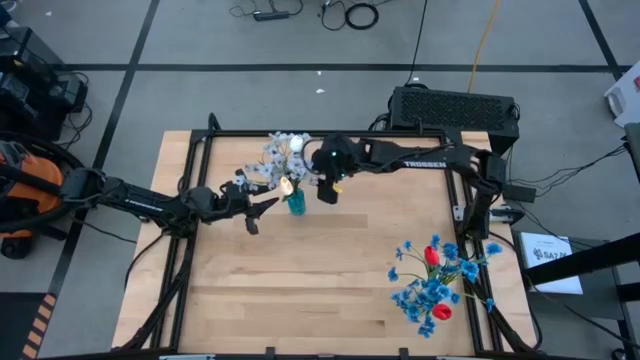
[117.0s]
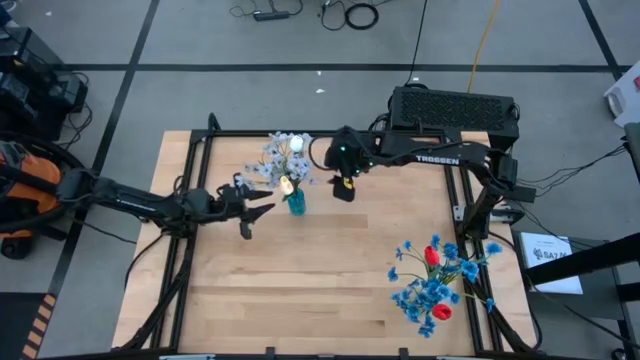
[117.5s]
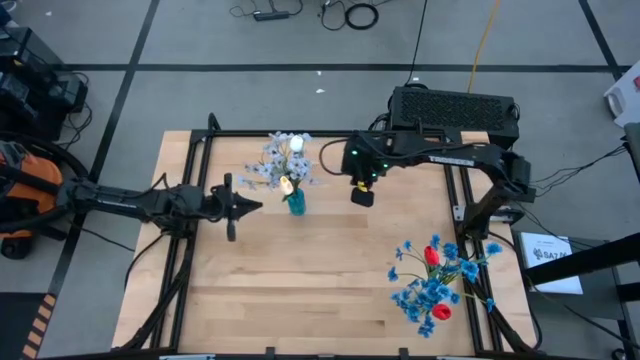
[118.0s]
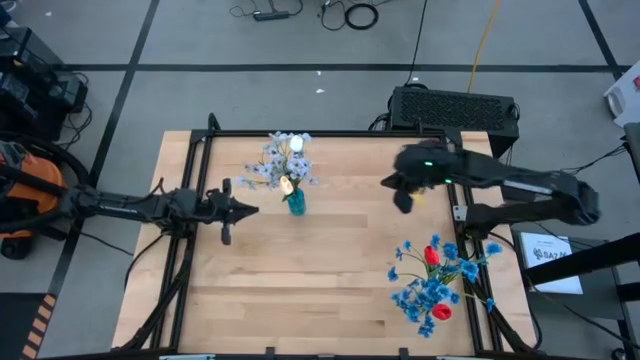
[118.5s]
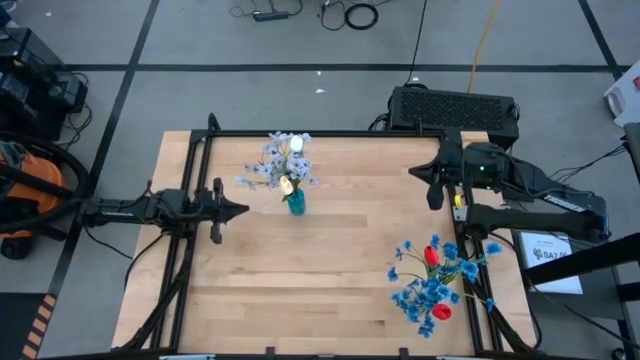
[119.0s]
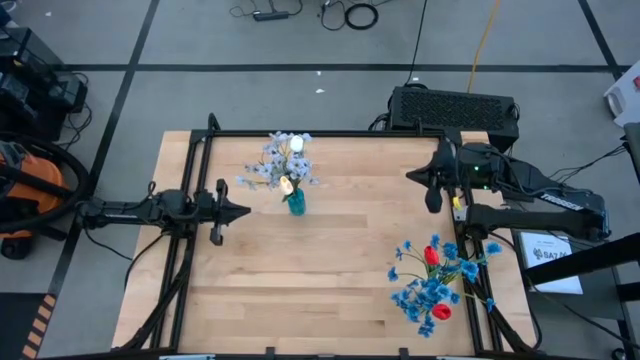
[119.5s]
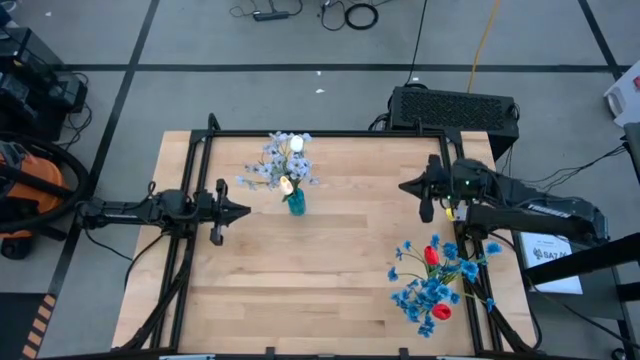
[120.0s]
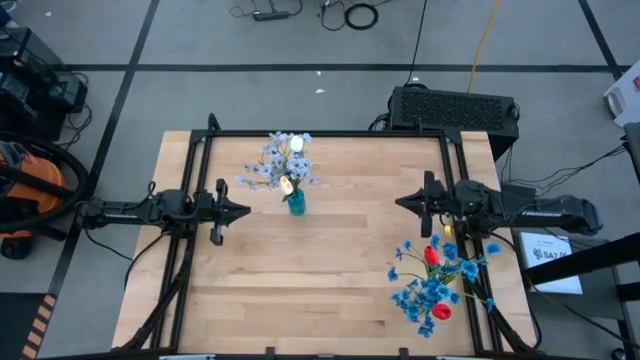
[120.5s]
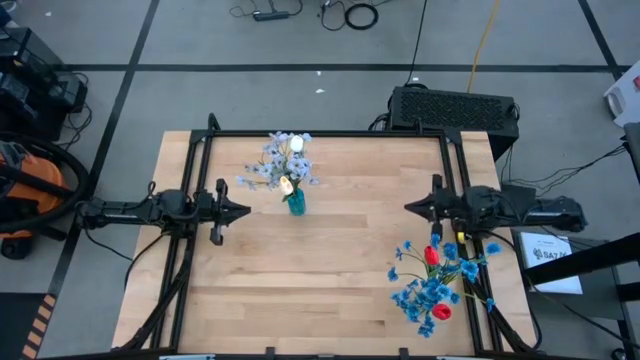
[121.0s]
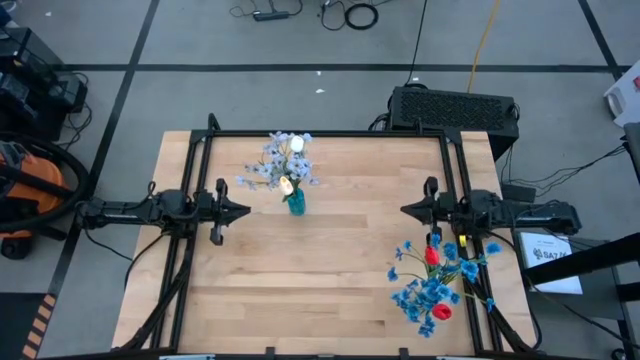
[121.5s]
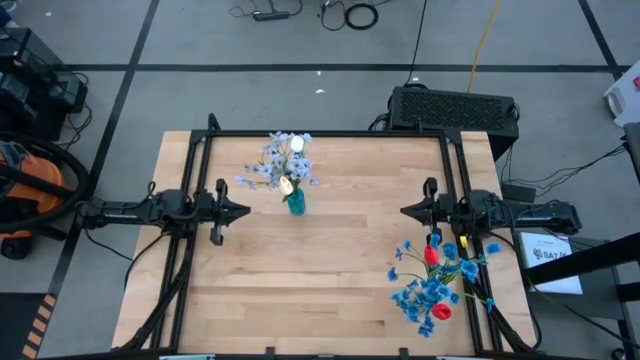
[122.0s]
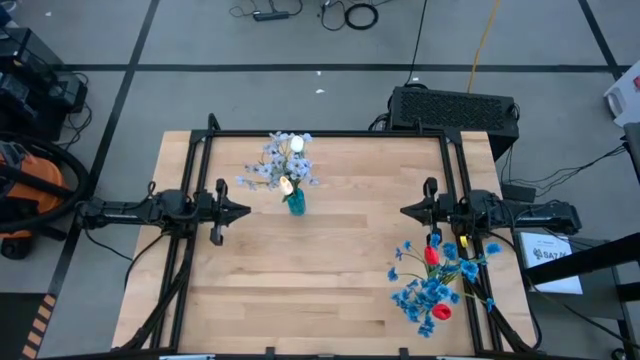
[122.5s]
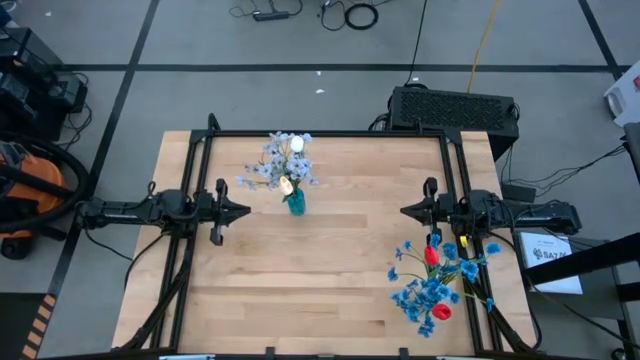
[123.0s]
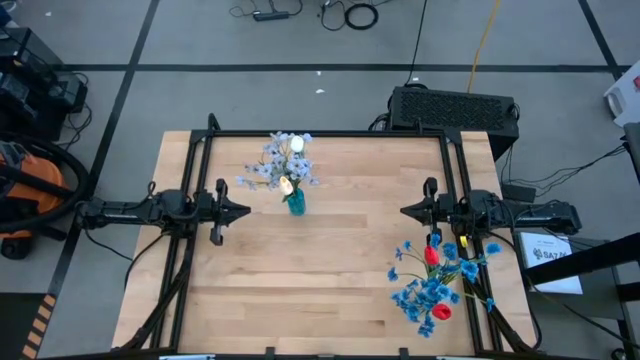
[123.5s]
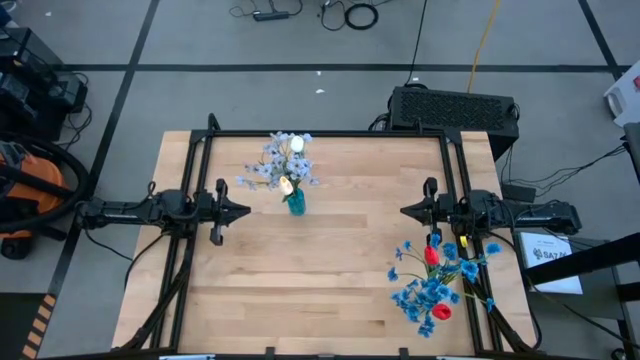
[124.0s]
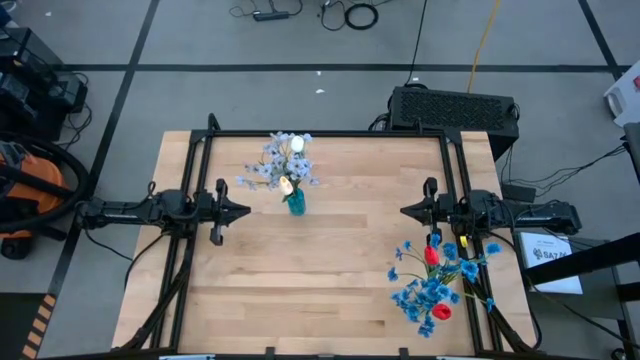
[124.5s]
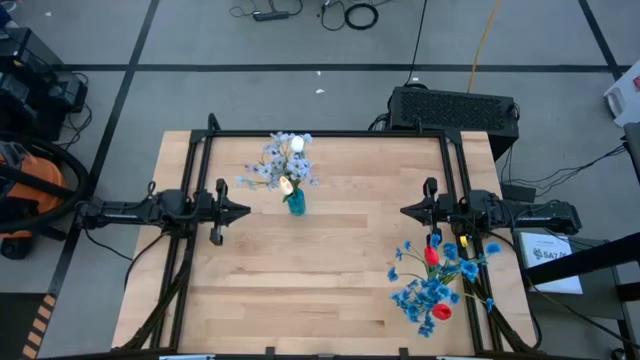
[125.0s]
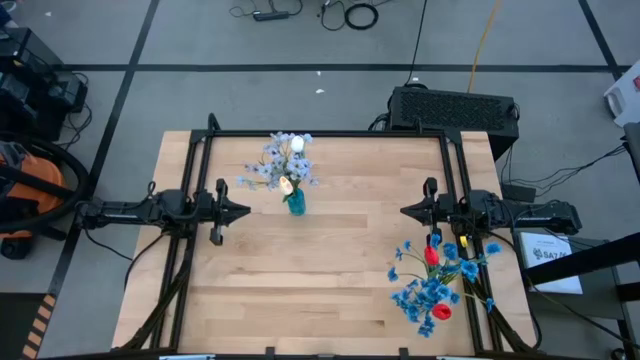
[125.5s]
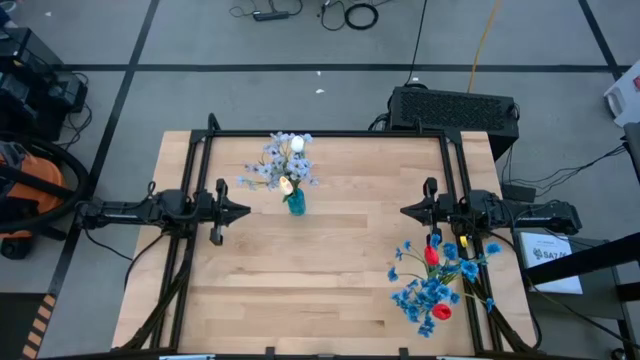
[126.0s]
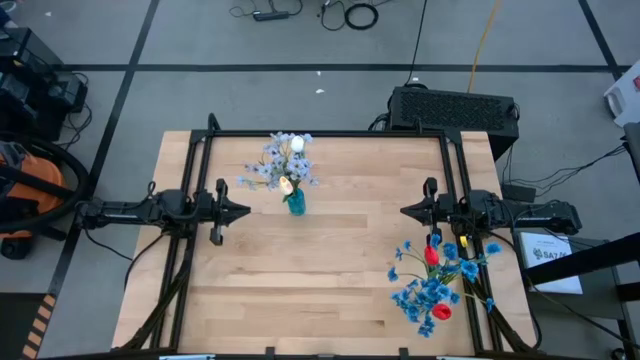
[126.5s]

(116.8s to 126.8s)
Task: Sort flowers into vase by color
Return to Home Position

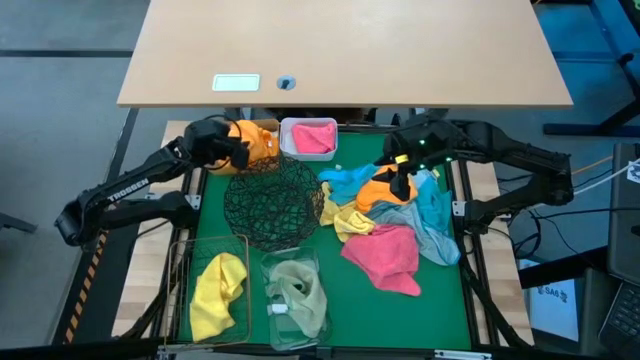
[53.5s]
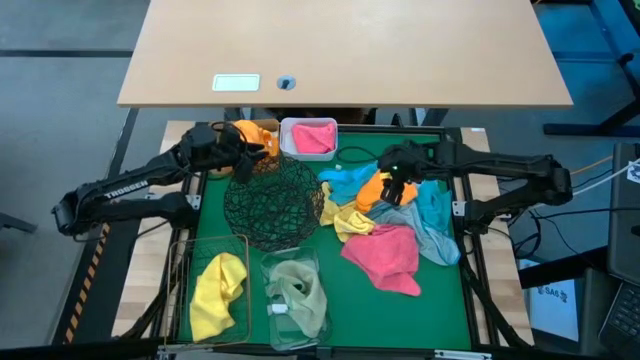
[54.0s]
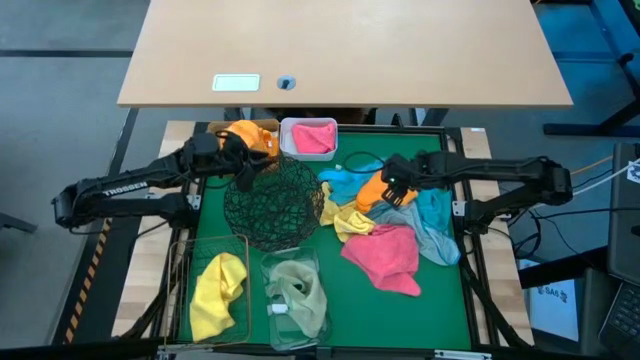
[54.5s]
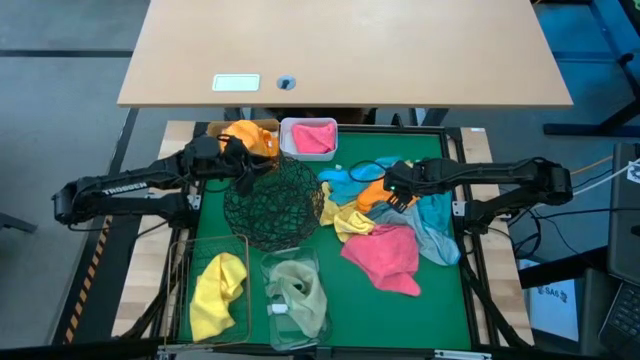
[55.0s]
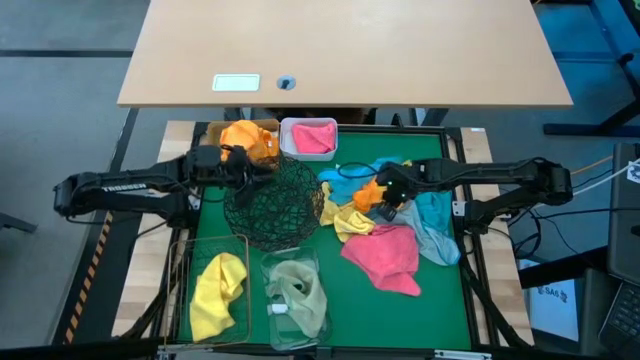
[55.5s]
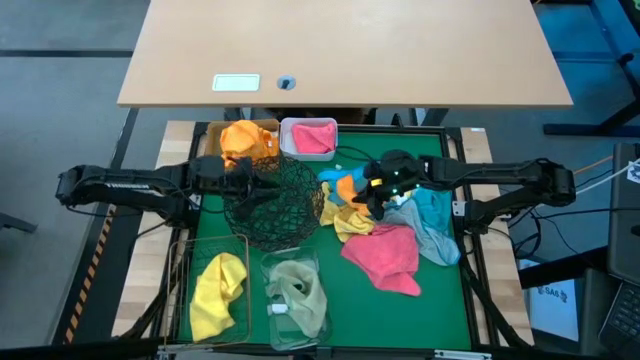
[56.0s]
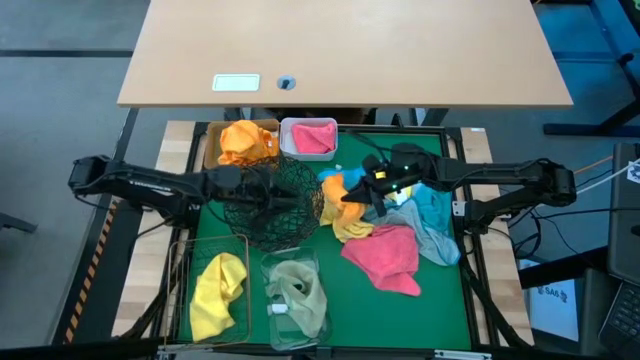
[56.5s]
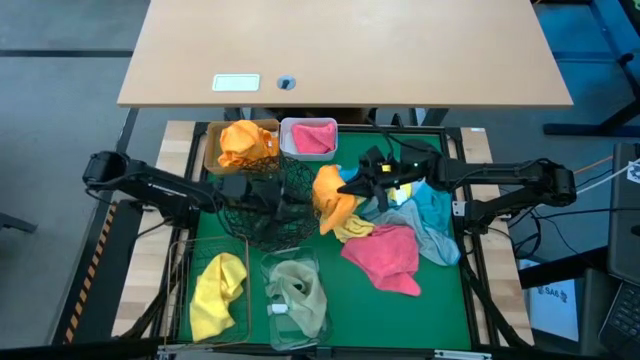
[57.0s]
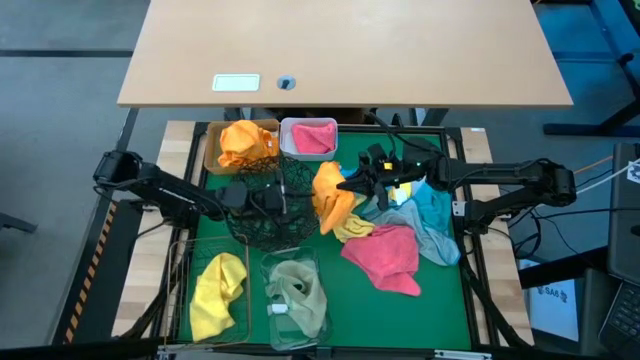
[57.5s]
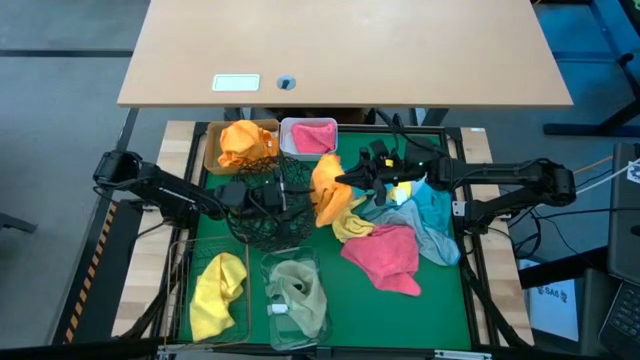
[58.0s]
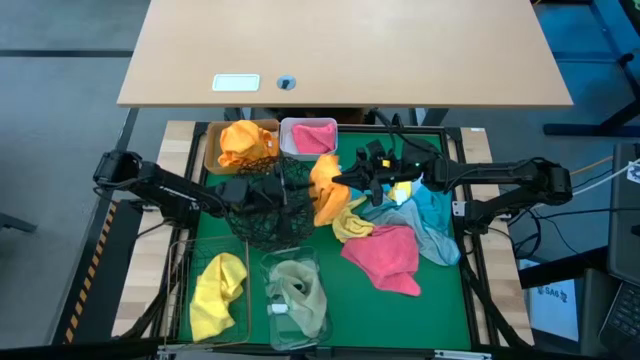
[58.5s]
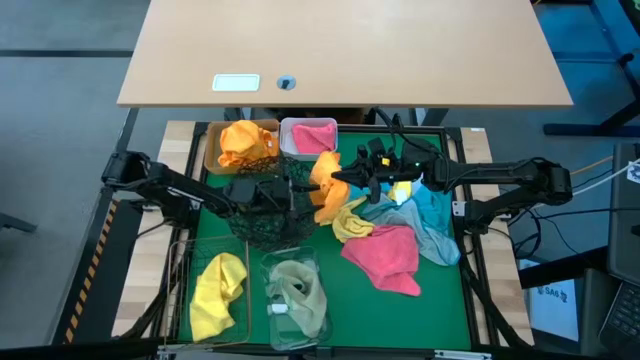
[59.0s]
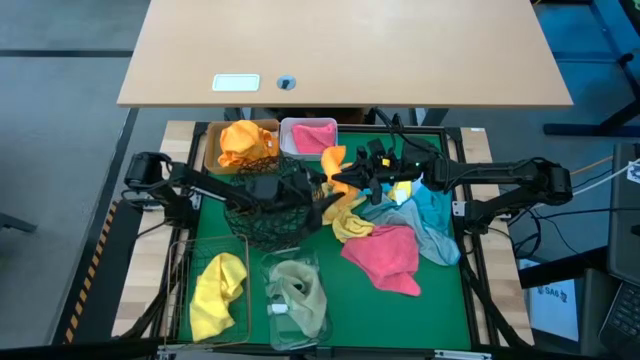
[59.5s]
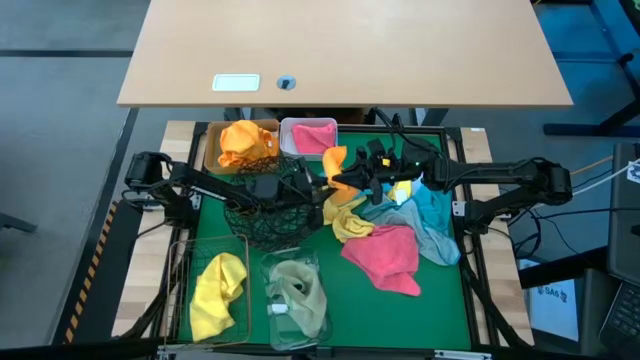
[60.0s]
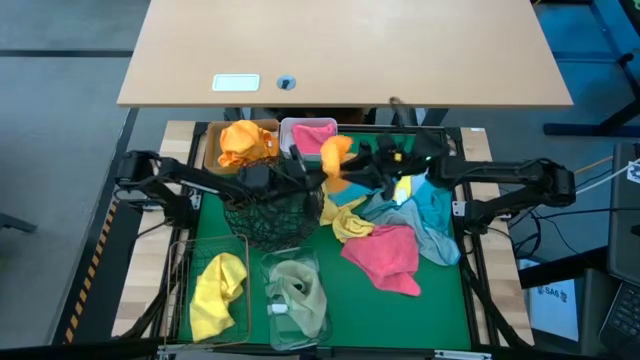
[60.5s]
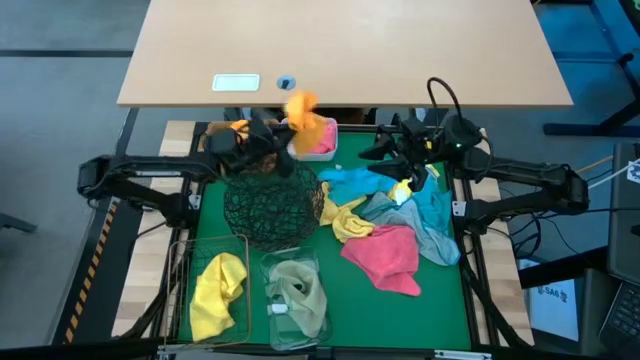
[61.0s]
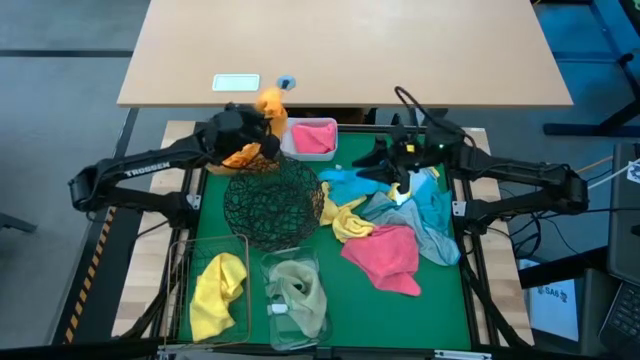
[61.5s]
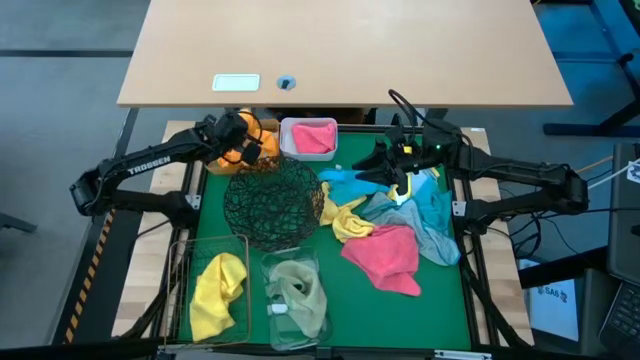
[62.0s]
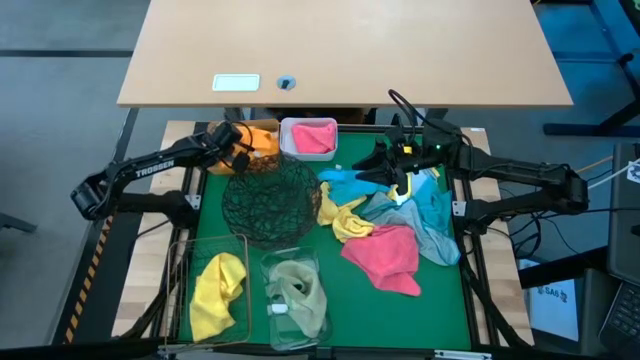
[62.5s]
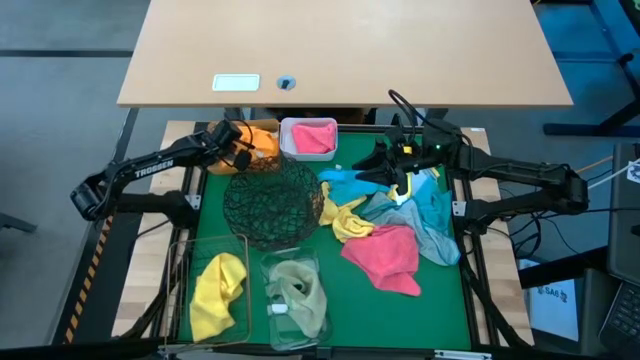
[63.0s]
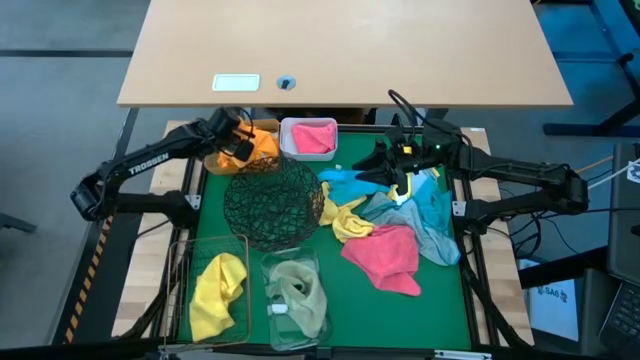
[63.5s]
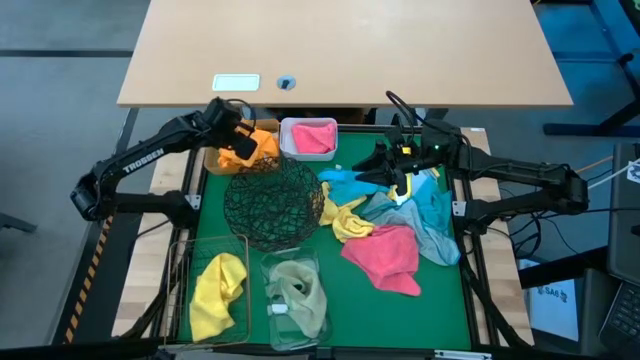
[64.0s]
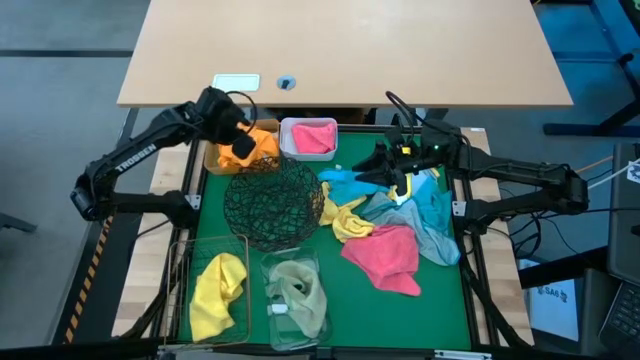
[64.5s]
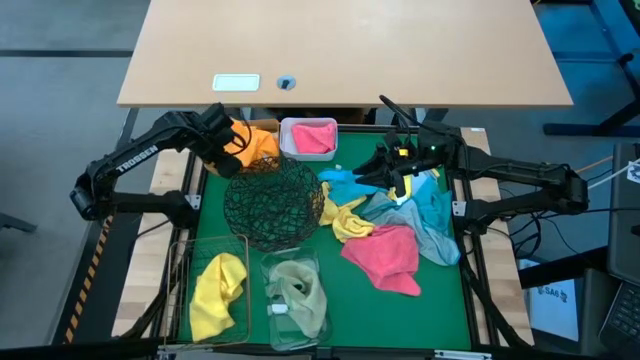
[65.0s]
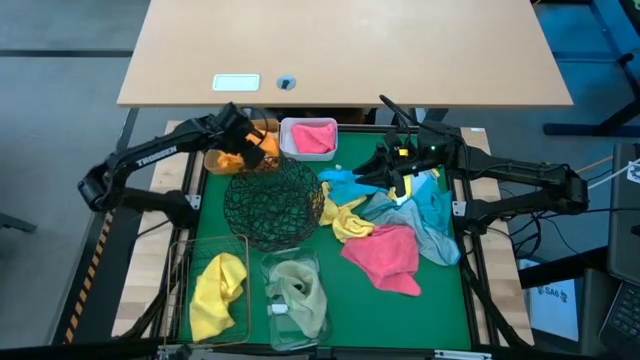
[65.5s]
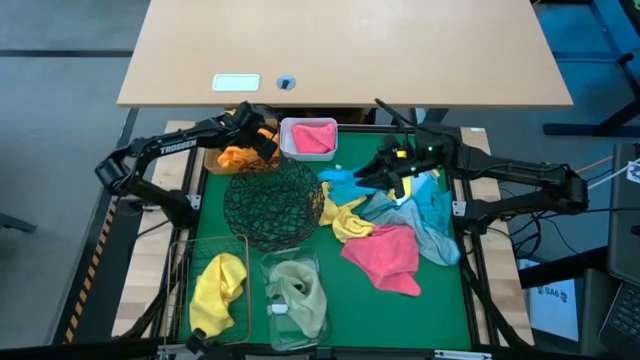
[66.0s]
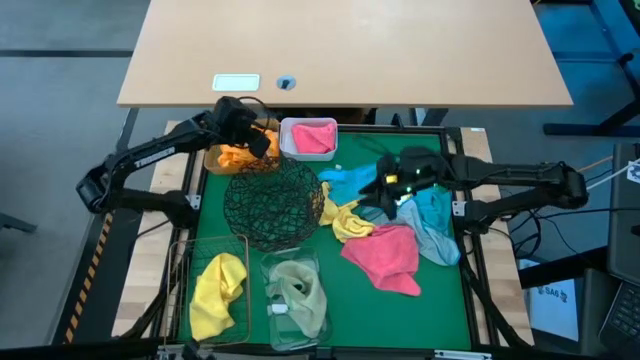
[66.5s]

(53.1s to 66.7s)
Task: Sort microfiber towel by color & place in baskets
Put the orange microfiber towel into the orange bin
